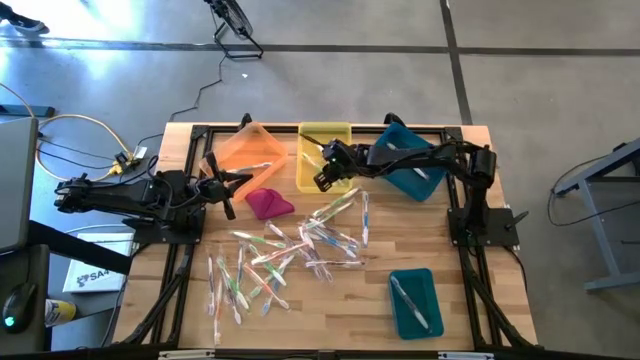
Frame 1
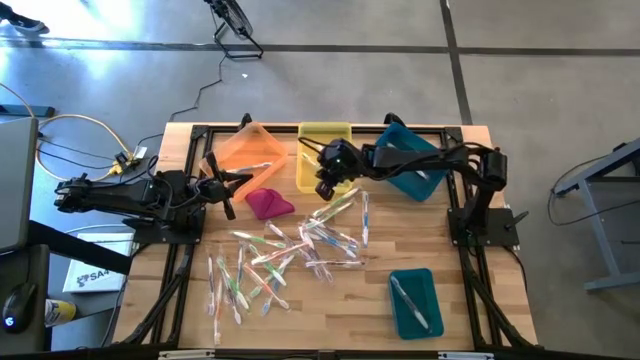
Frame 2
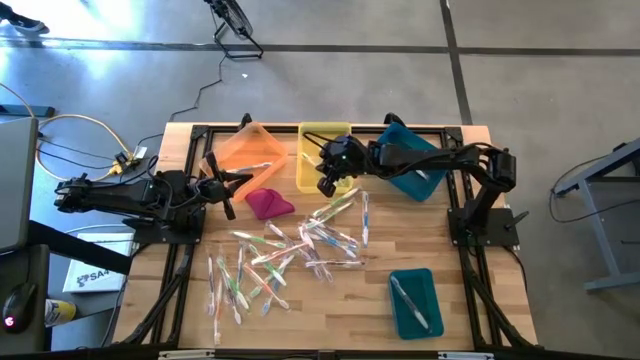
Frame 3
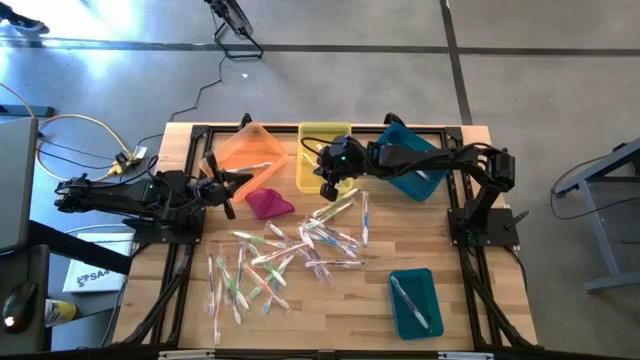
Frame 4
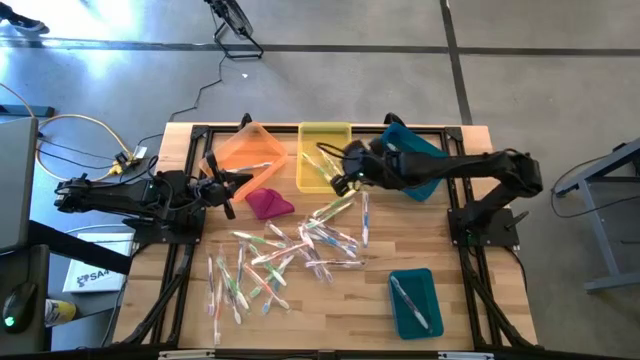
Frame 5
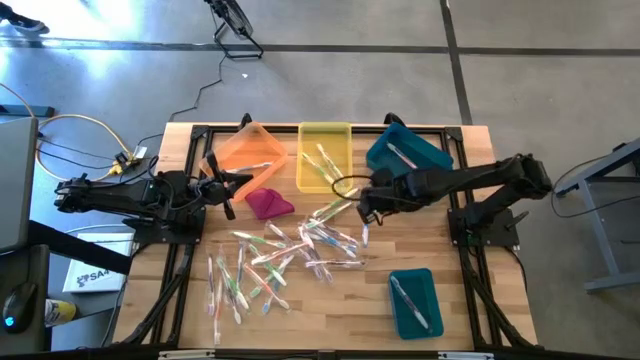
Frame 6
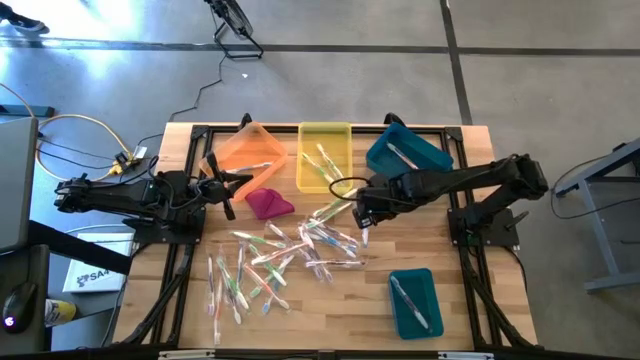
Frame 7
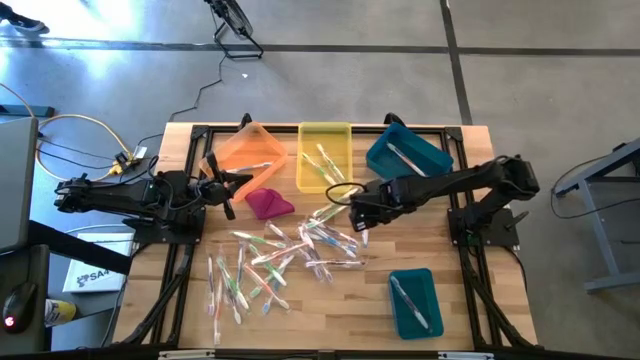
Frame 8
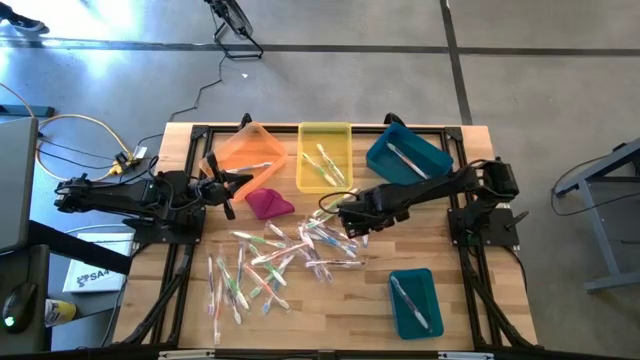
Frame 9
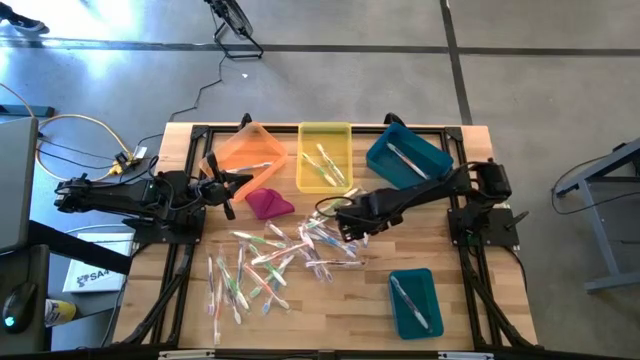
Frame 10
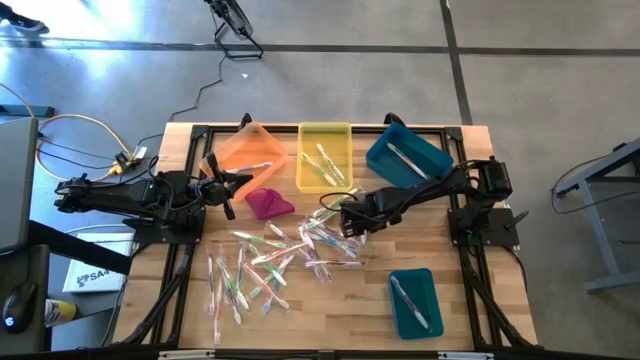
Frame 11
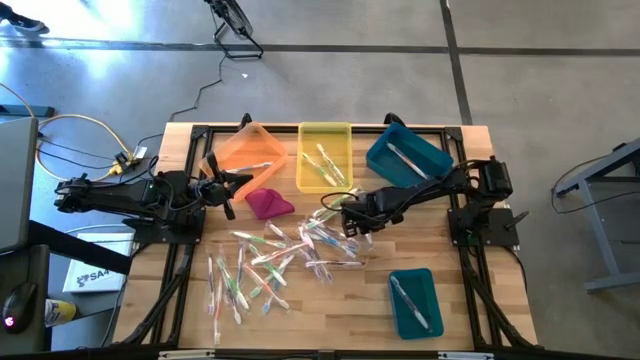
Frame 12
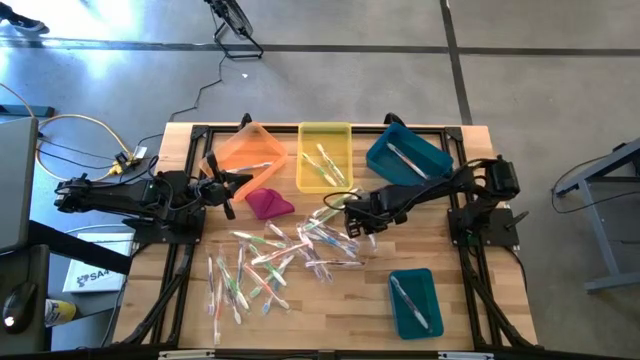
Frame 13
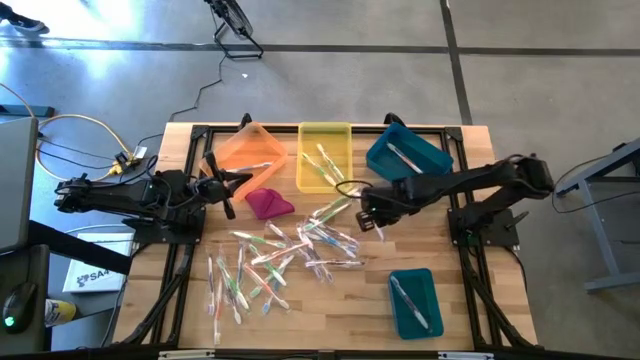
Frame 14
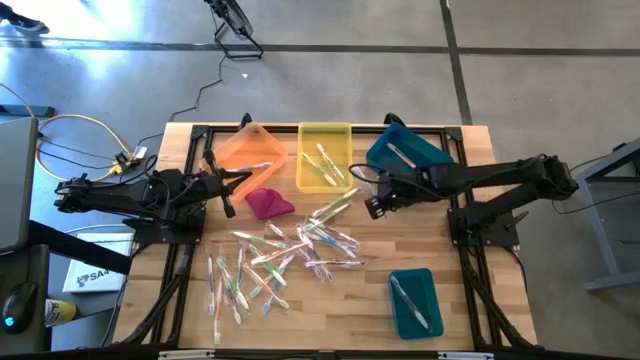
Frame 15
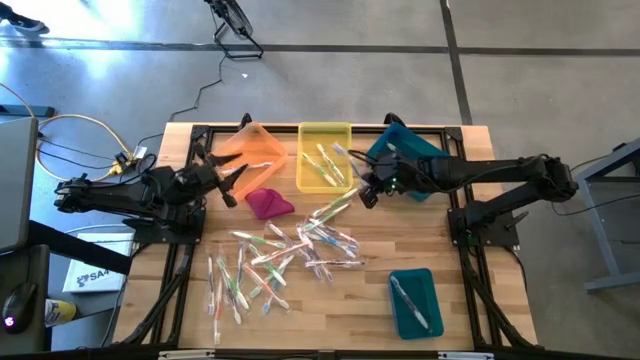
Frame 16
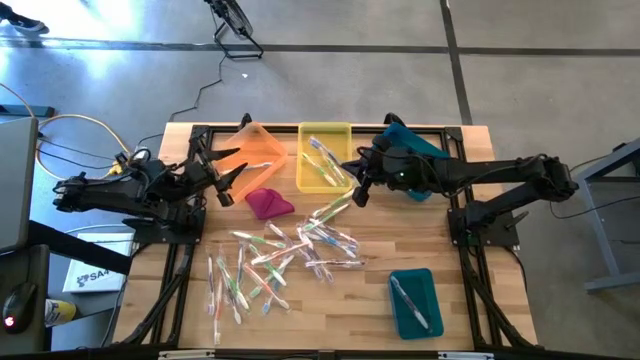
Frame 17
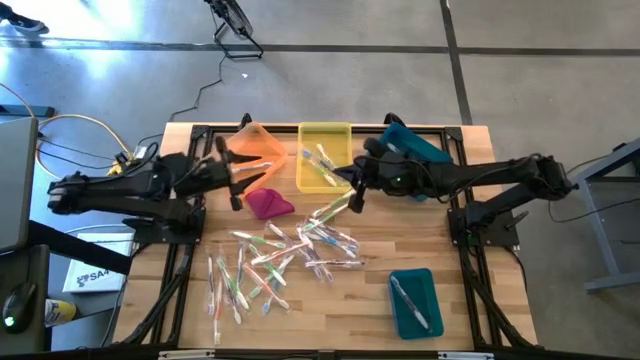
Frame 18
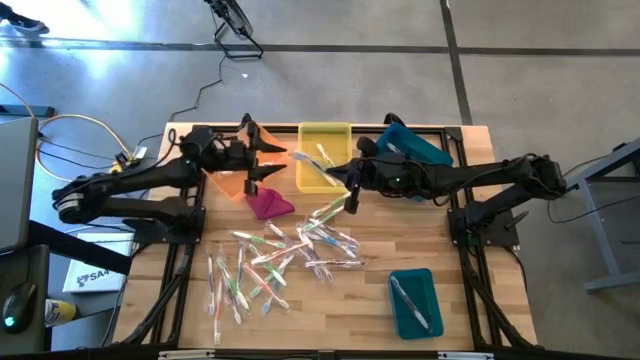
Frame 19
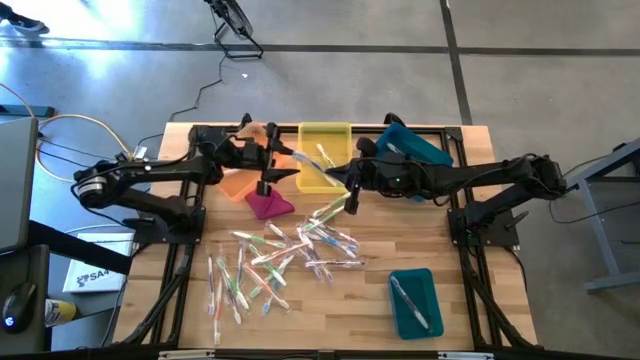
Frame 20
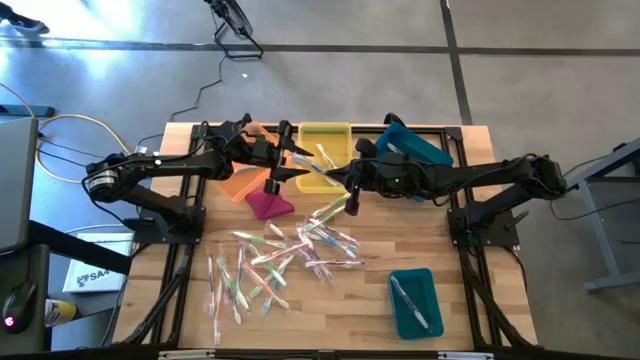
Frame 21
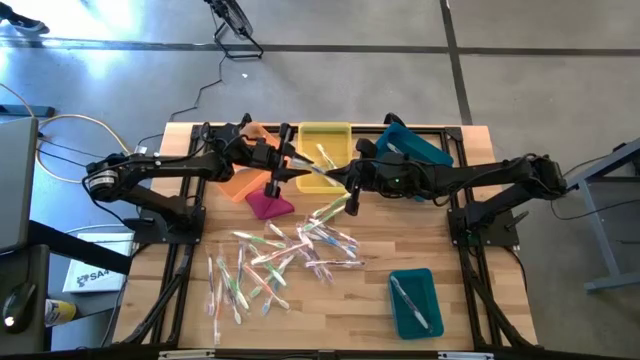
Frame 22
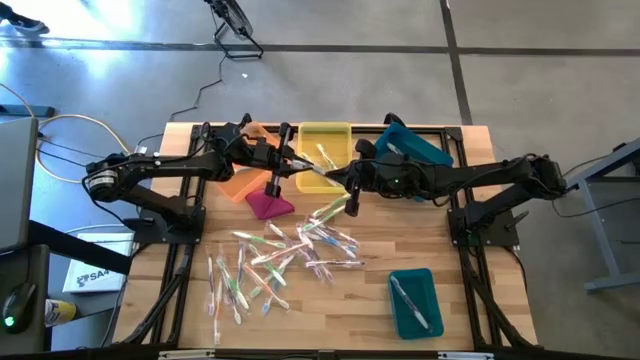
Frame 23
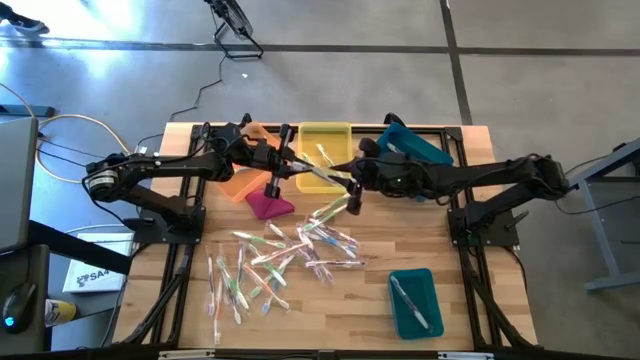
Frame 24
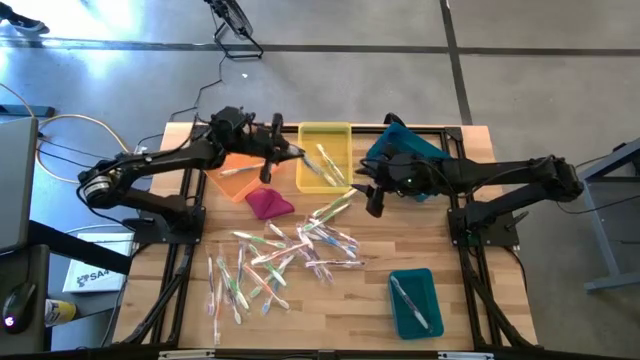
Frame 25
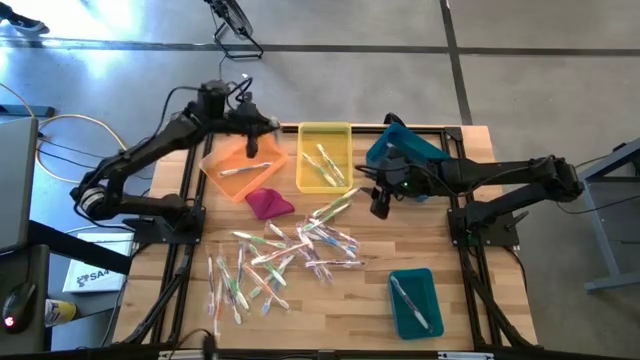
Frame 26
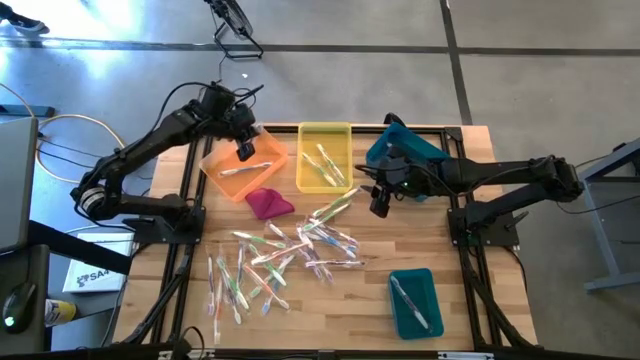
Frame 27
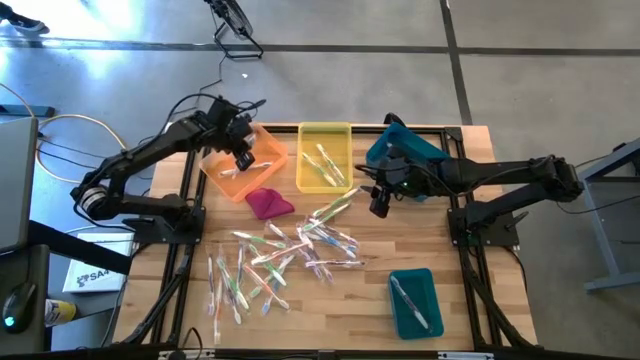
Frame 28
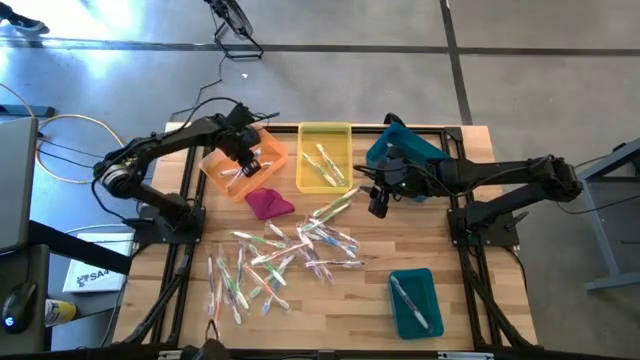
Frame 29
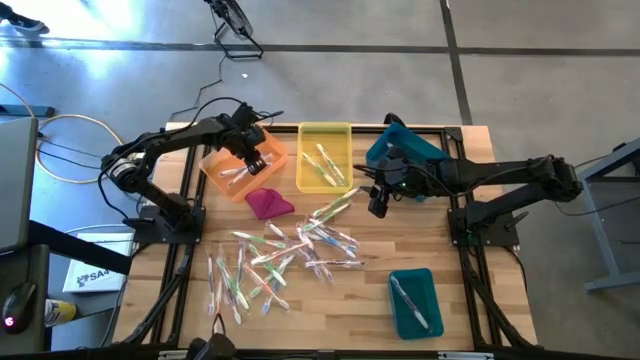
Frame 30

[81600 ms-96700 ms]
Task: Pick & Place Toothbrushes
Put the blue toothbrush into the orange bin

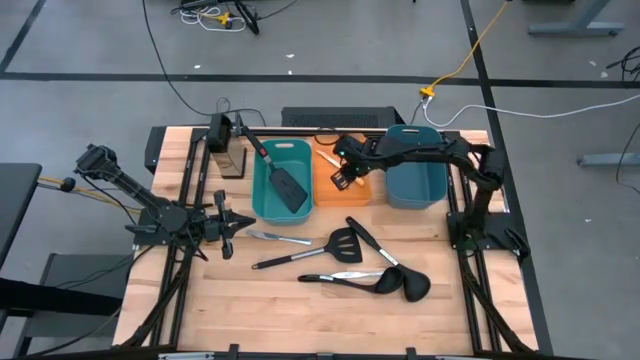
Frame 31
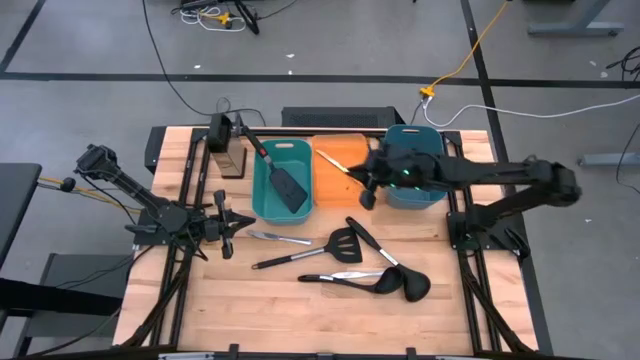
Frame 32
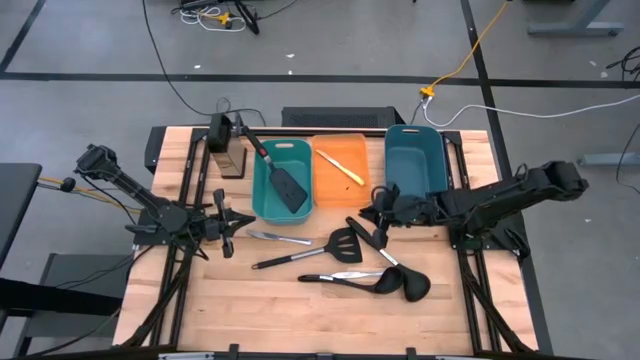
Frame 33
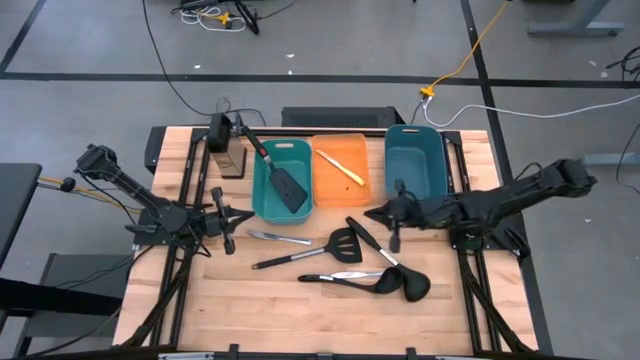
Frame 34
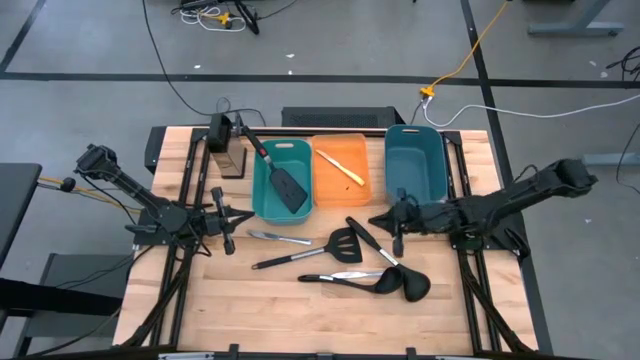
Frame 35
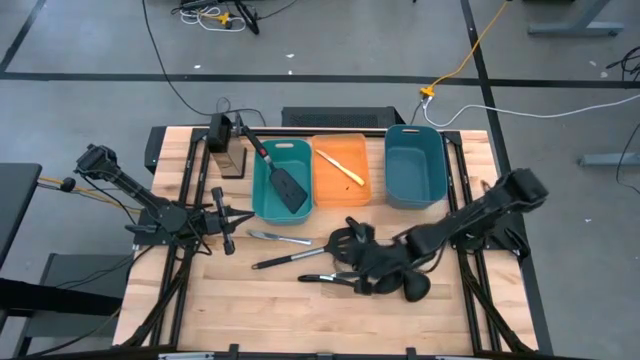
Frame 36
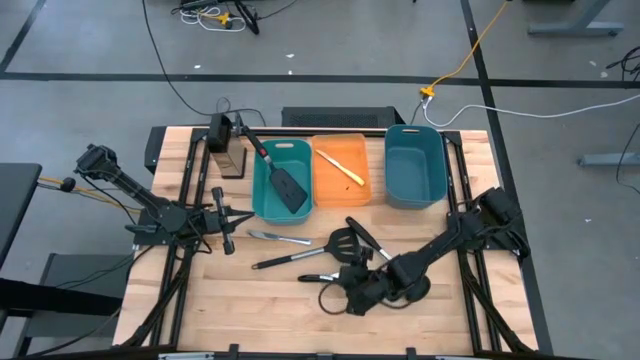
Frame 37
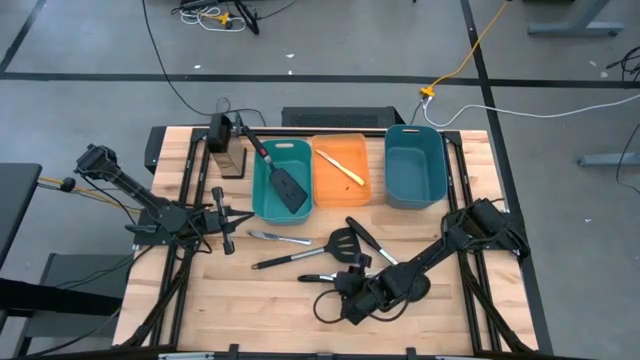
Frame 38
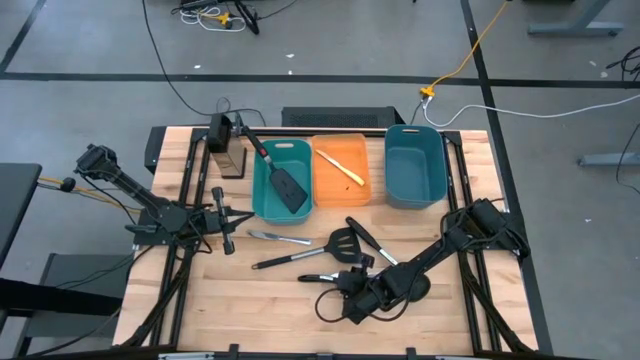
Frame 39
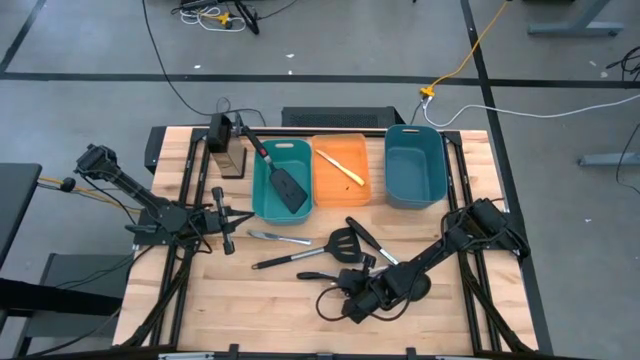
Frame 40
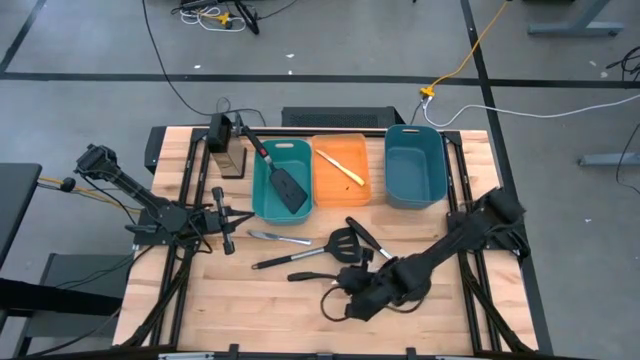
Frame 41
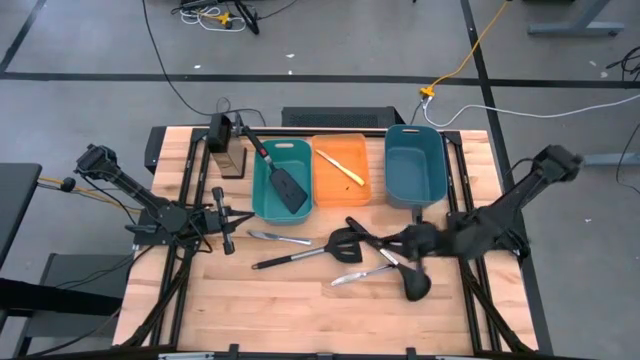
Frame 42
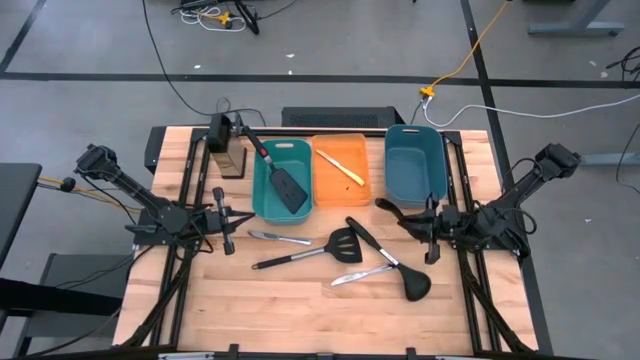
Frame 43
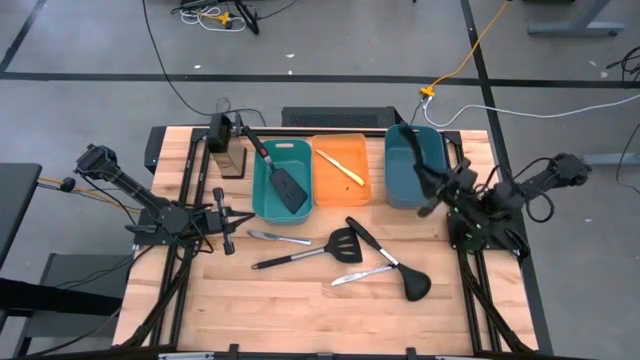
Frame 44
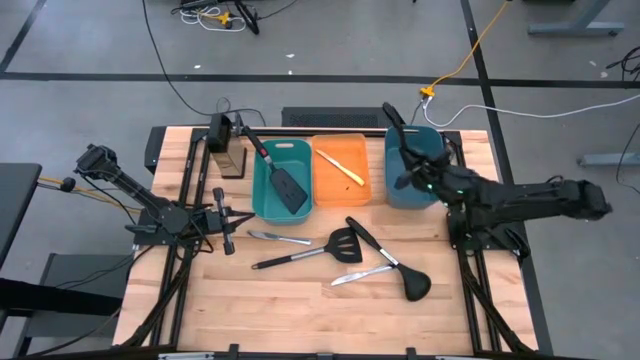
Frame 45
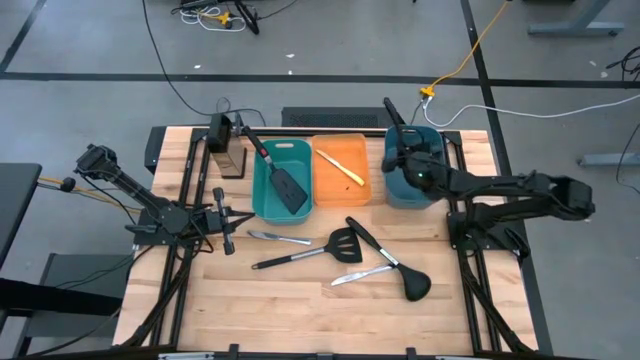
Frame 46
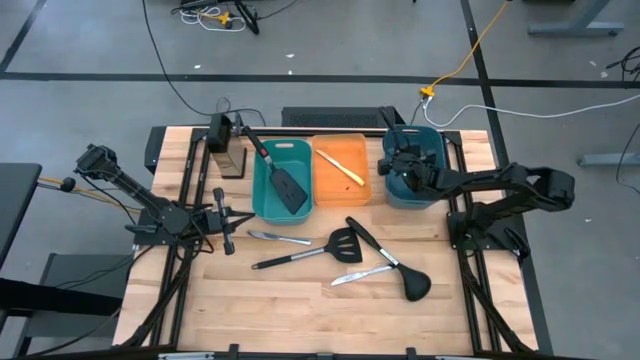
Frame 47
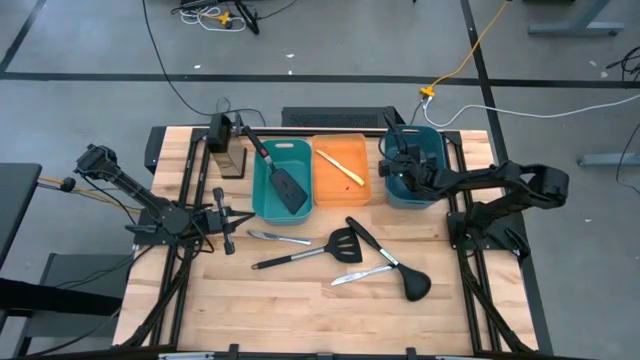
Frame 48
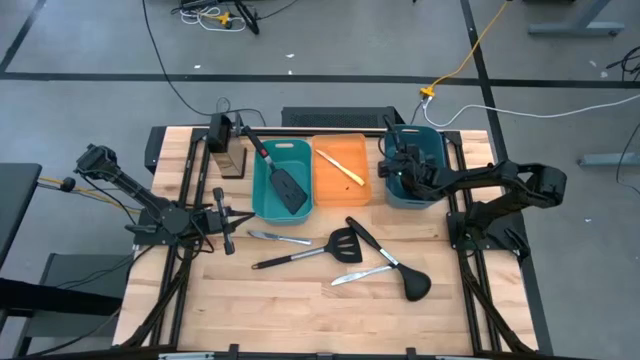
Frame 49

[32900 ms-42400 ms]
Task: Pick & Place Kitchen Items
Put the bottom black serving spoon into the green bin
